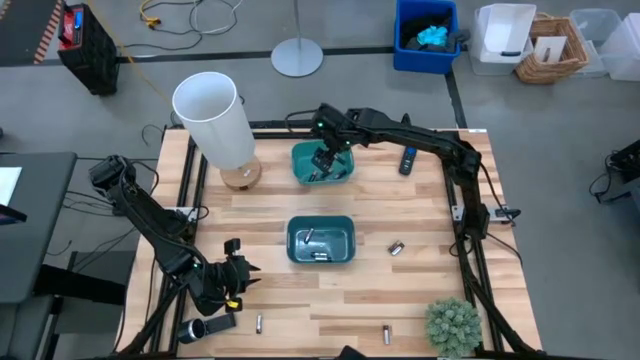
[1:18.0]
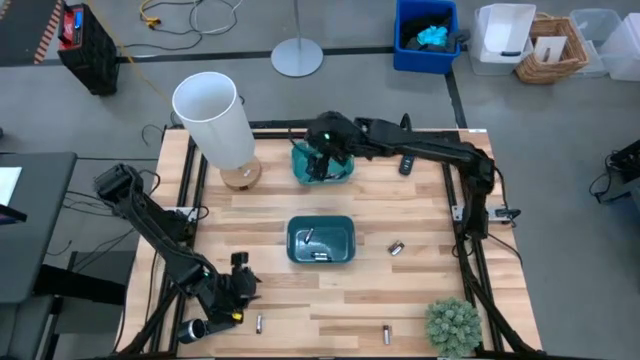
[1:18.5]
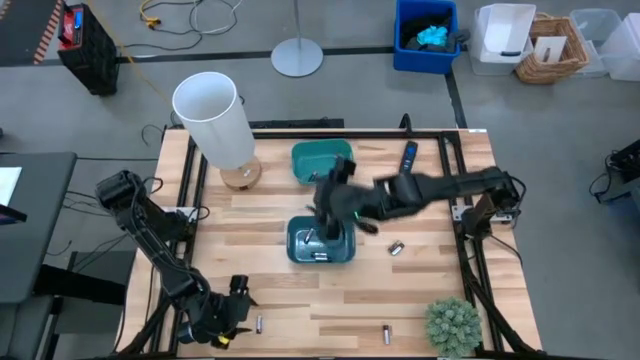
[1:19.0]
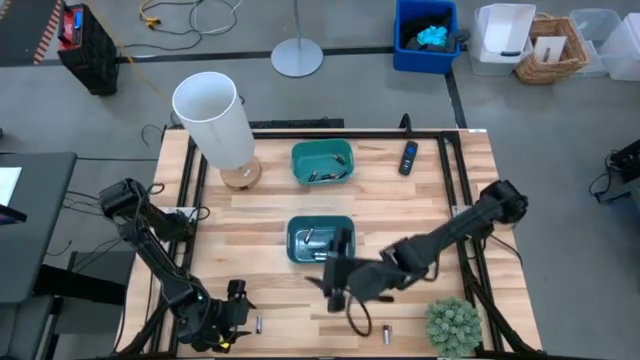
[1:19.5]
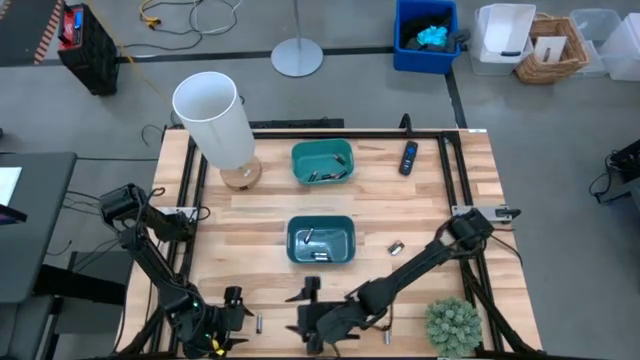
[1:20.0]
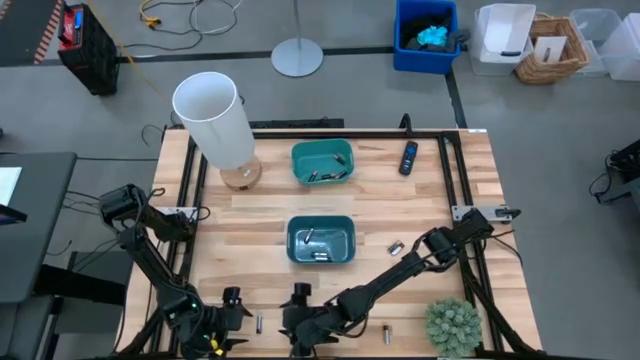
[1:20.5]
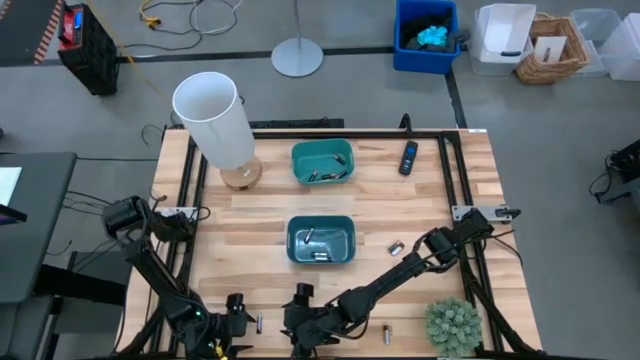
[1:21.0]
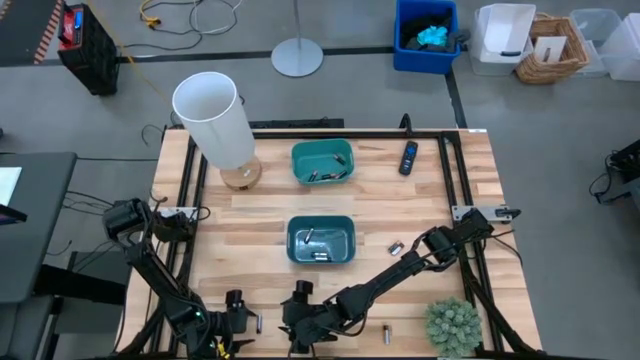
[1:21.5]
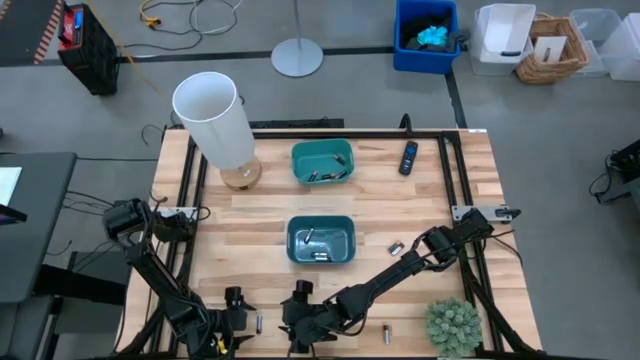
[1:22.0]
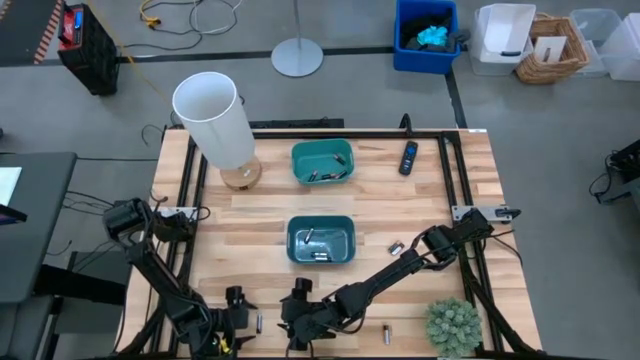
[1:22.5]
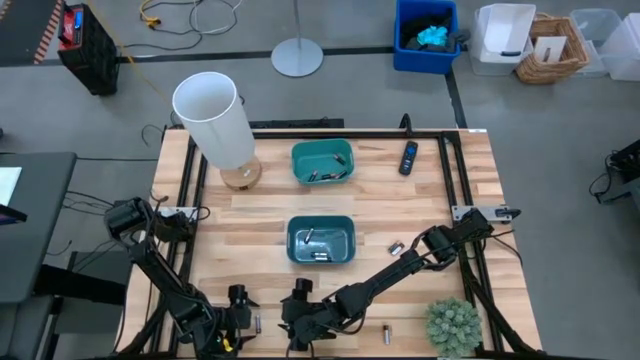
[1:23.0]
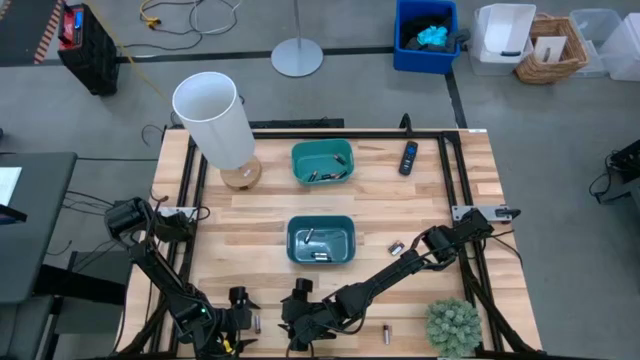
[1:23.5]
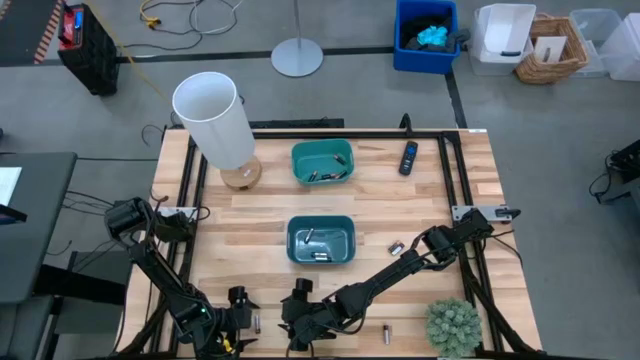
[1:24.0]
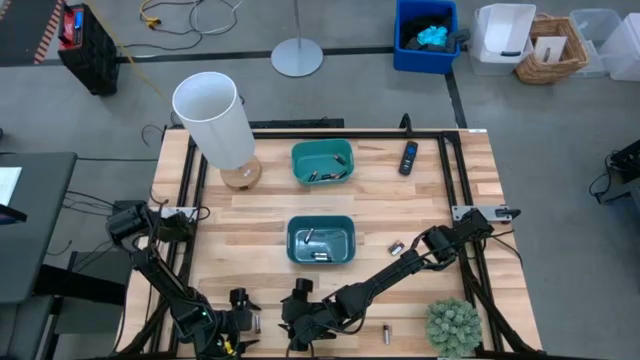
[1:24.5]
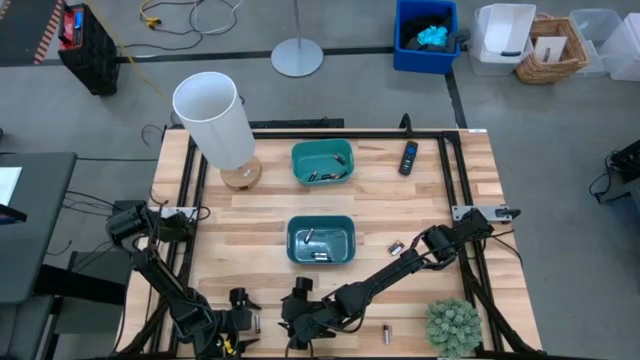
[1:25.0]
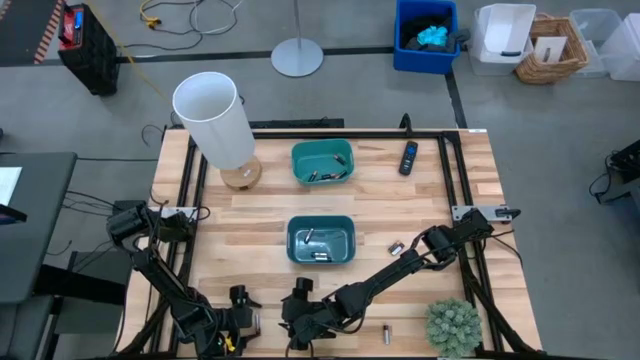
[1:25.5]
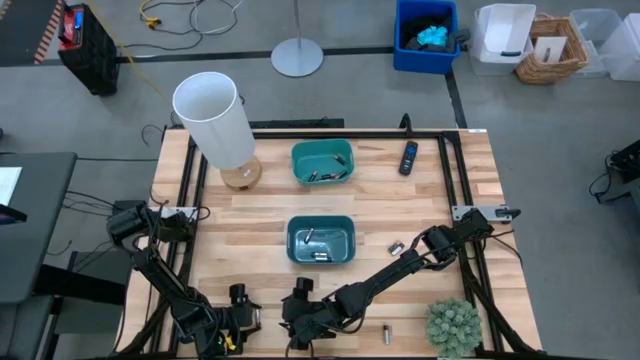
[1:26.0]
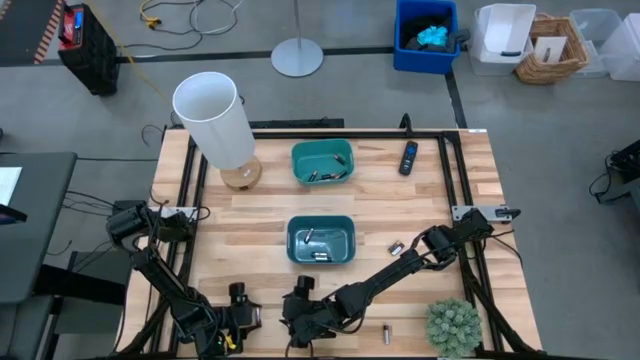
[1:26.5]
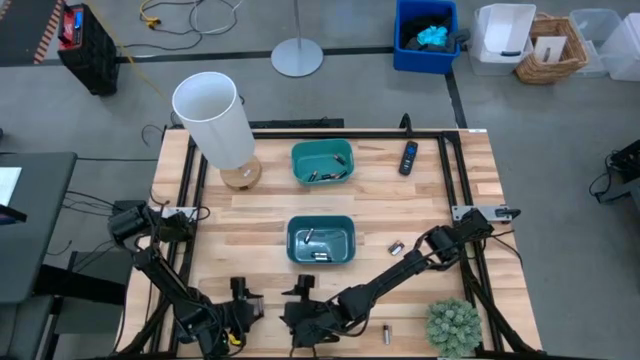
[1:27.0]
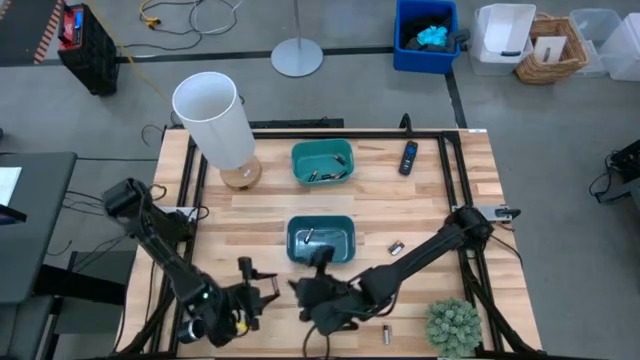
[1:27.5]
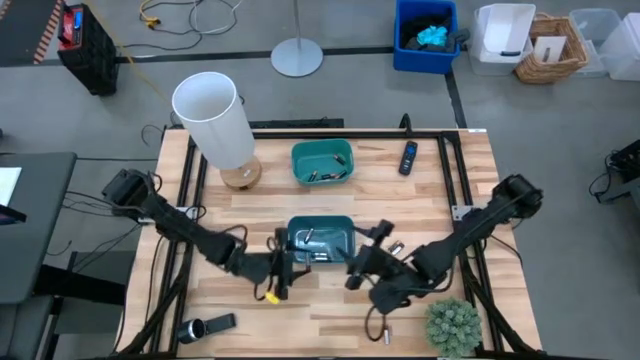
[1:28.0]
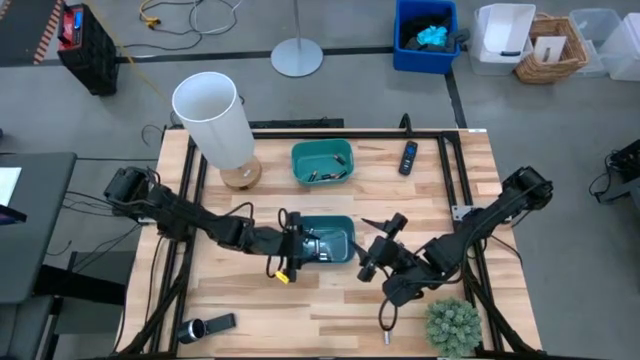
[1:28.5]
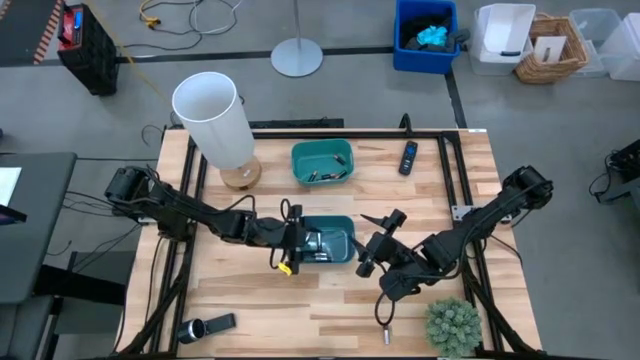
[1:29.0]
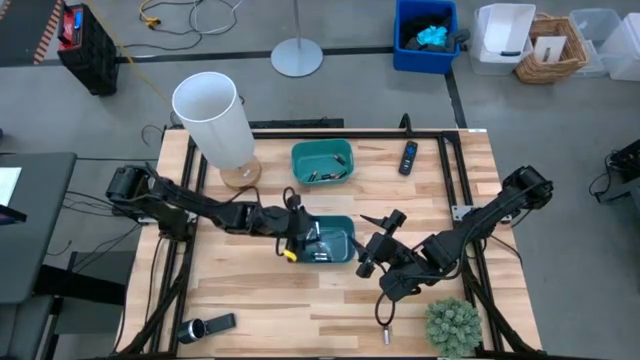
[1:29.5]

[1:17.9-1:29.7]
Task: Sort batteries
Put the silver battery into the blue bin

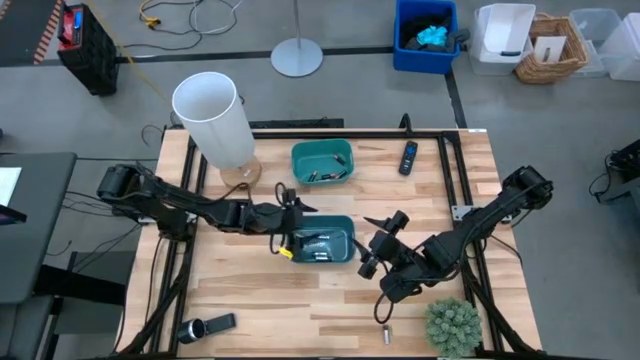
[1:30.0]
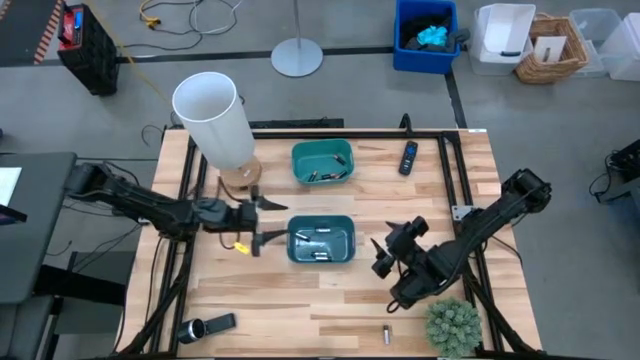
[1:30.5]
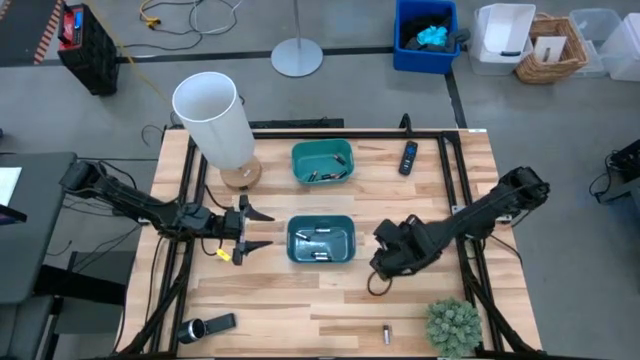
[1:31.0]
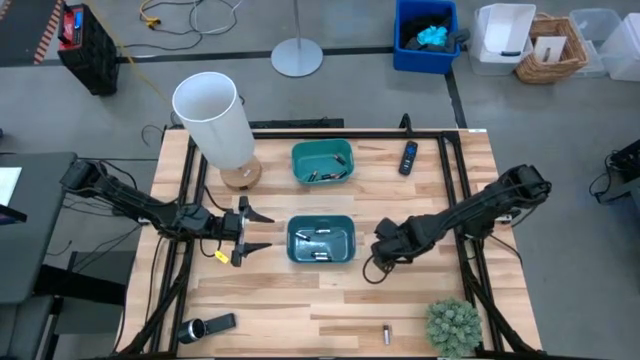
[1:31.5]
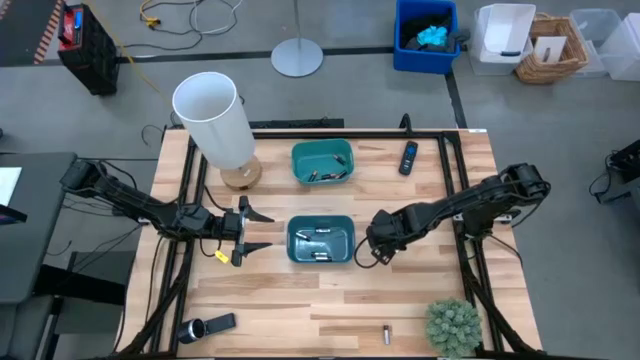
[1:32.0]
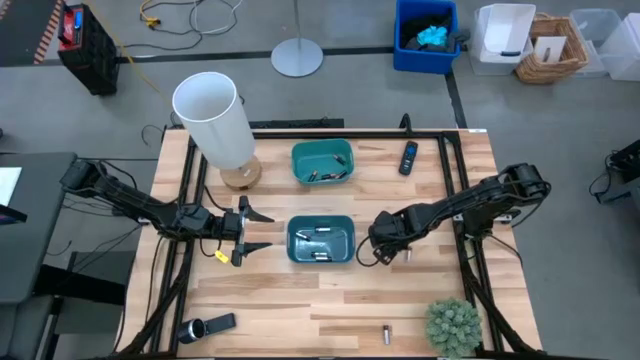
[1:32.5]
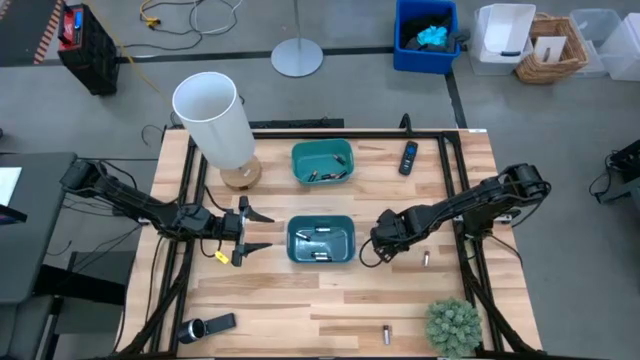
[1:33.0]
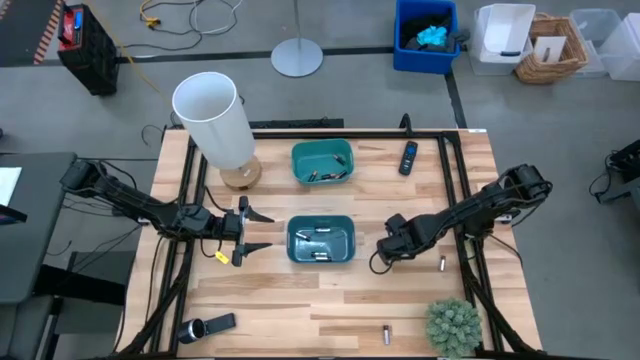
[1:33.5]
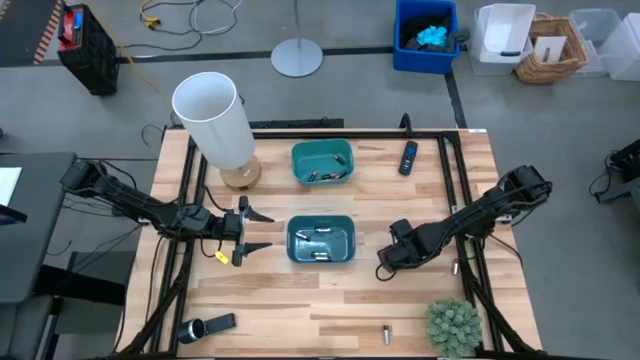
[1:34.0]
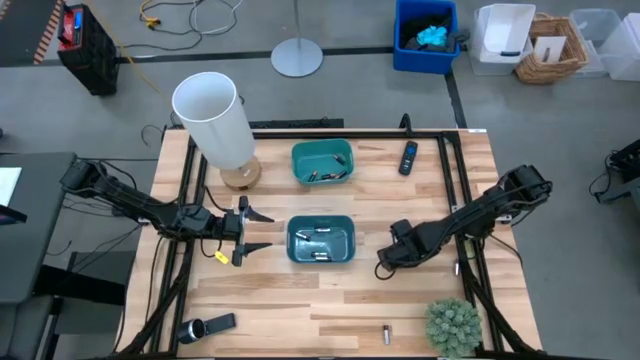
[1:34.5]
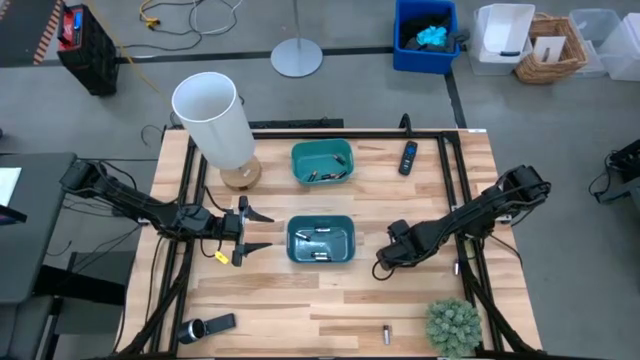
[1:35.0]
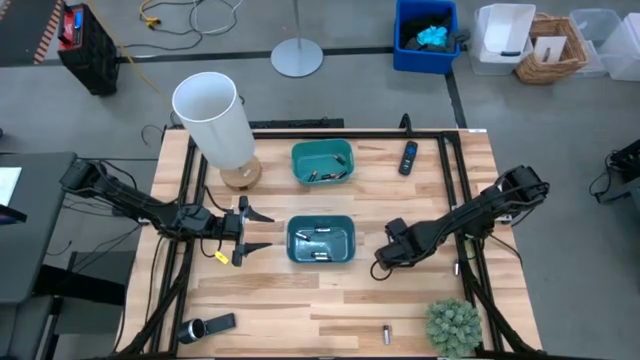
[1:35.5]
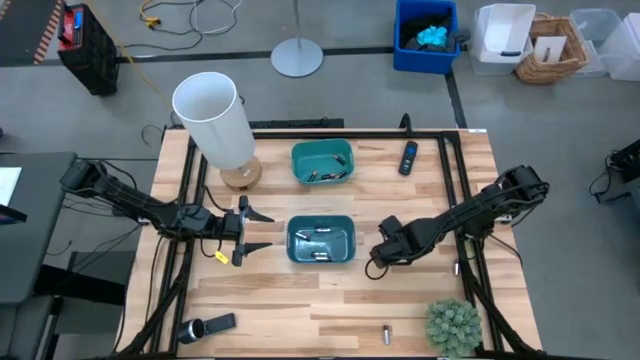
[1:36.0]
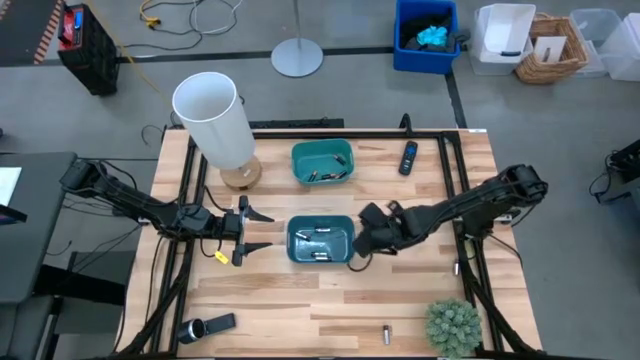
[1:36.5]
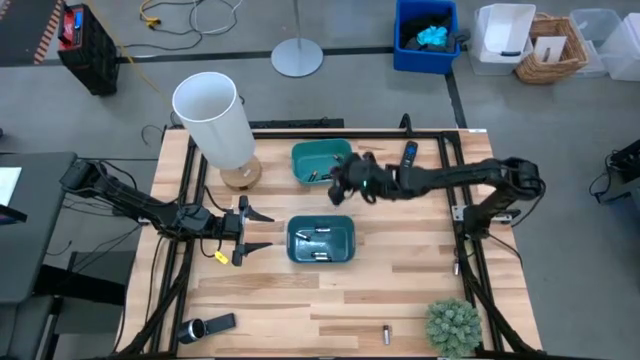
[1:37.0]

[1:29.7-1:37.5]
Put the black battery into the green bin

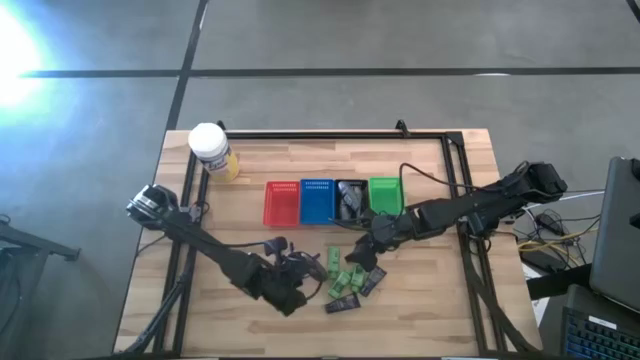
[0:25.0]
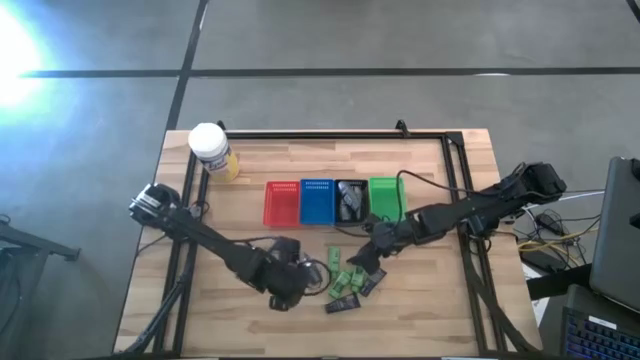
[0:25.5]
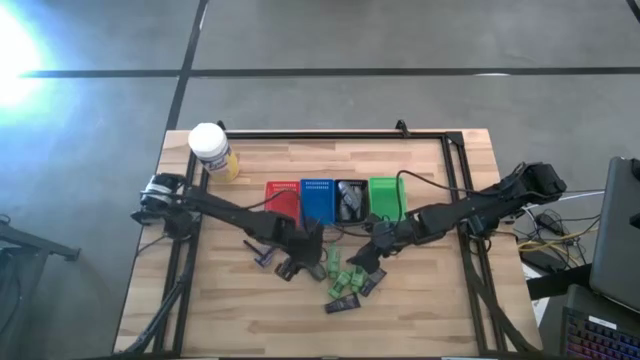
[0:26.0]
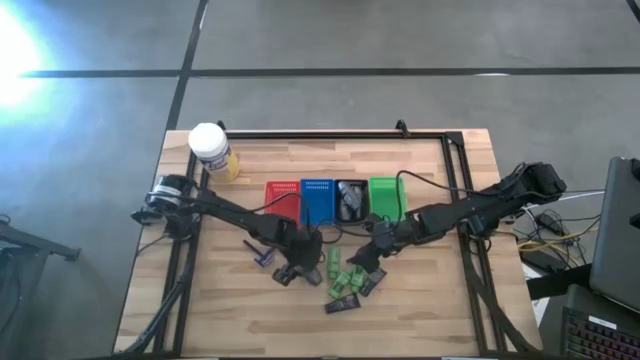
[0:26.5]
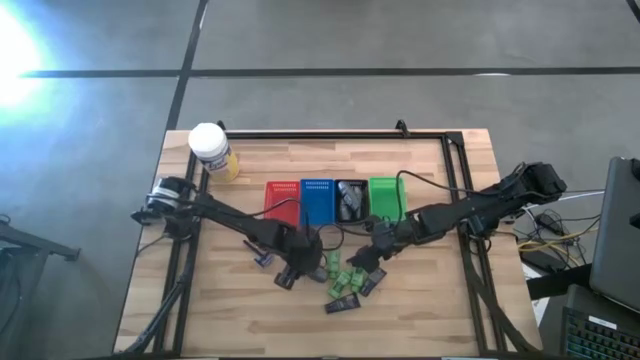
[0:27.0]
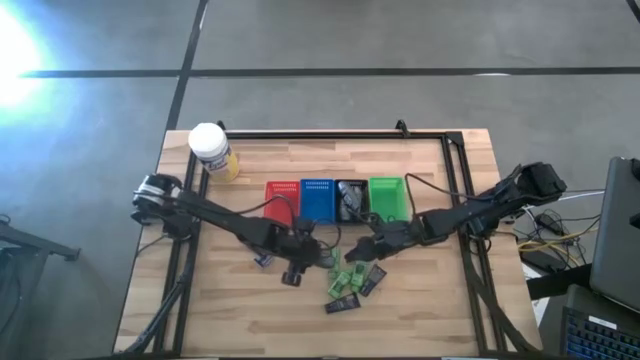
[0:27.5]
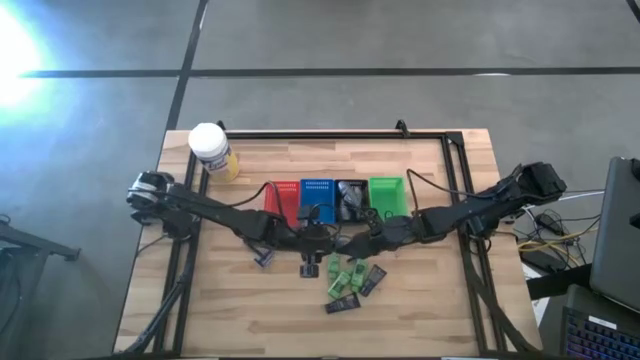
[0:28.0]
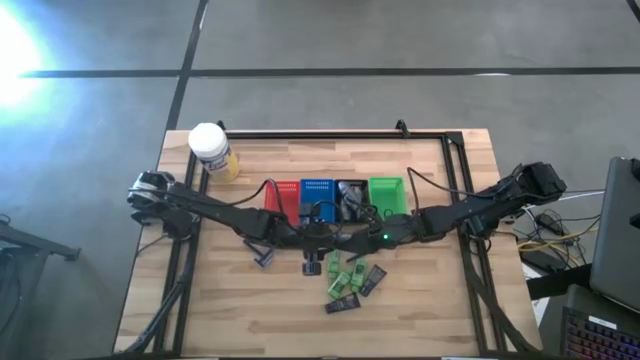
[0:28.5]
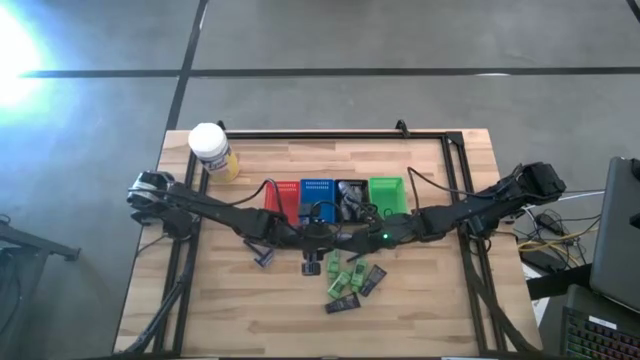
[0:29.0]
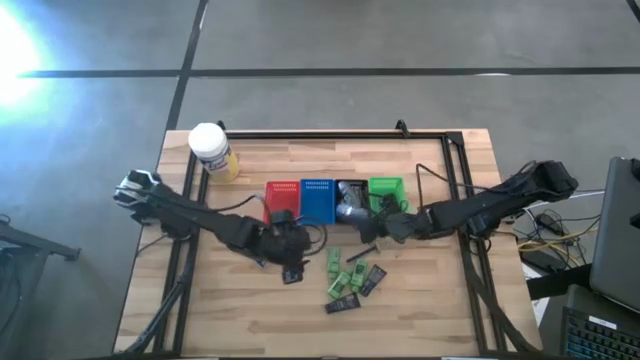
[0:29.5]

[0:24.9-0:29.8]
Task: Pick & Place Travel size toiletries
Put the gray deodorant into the black bin
